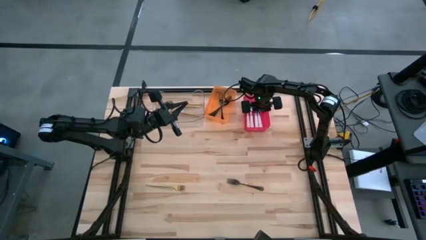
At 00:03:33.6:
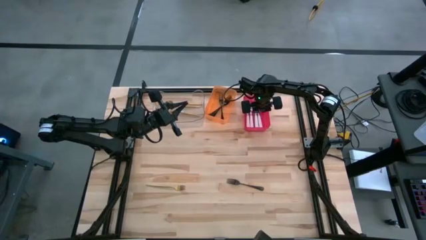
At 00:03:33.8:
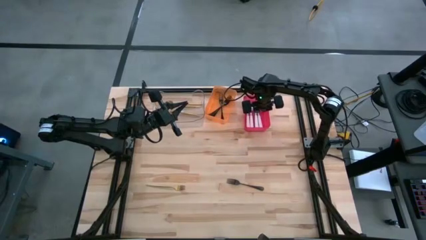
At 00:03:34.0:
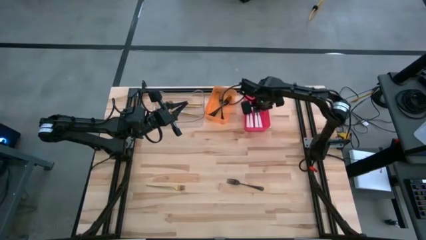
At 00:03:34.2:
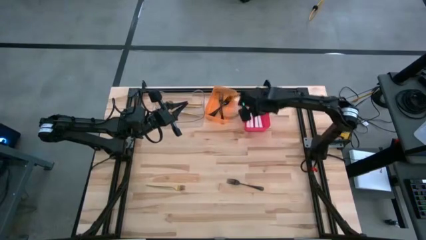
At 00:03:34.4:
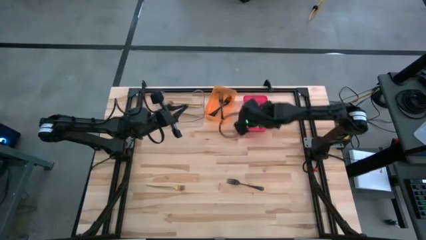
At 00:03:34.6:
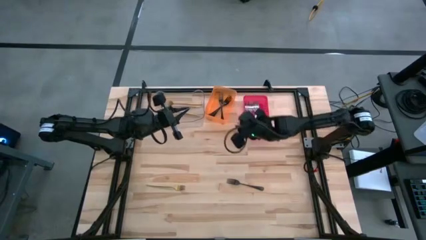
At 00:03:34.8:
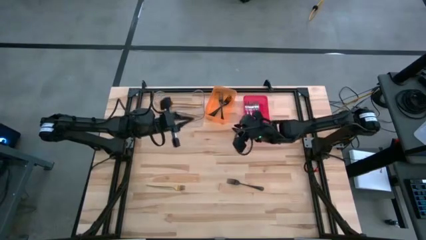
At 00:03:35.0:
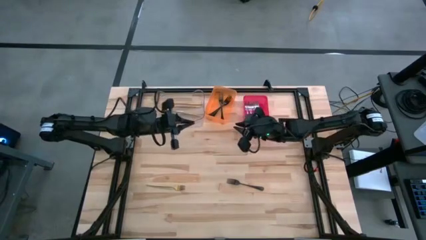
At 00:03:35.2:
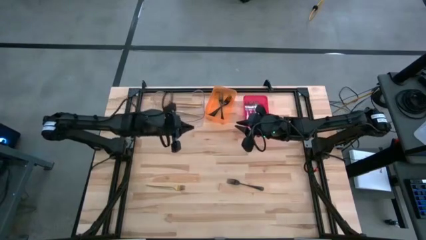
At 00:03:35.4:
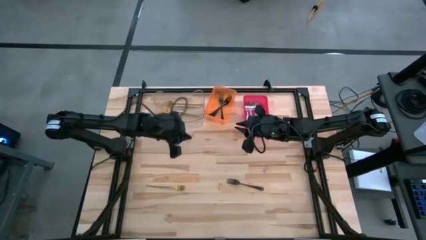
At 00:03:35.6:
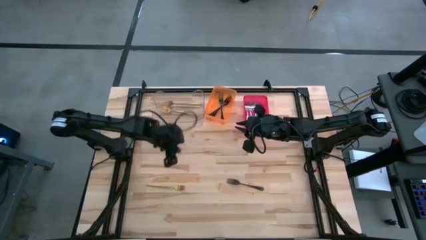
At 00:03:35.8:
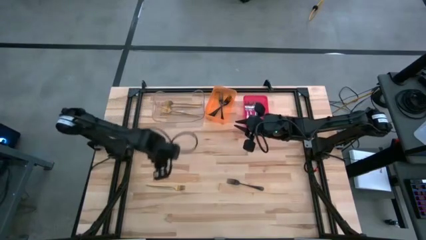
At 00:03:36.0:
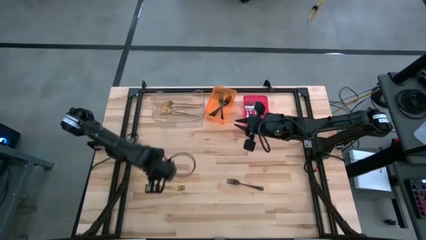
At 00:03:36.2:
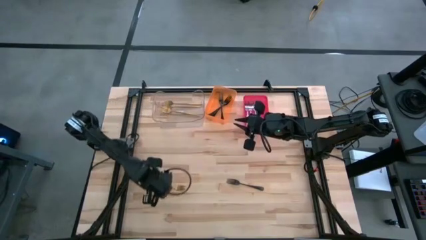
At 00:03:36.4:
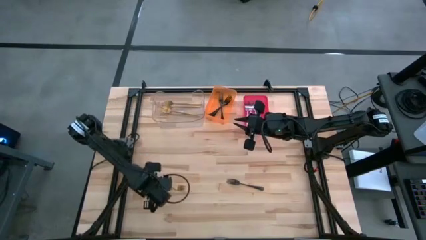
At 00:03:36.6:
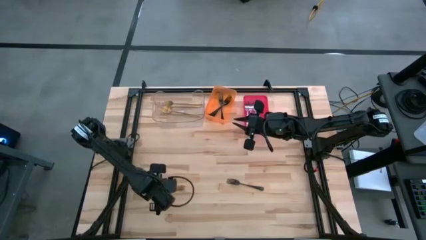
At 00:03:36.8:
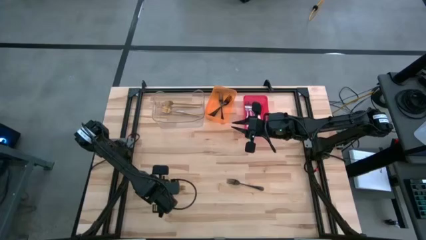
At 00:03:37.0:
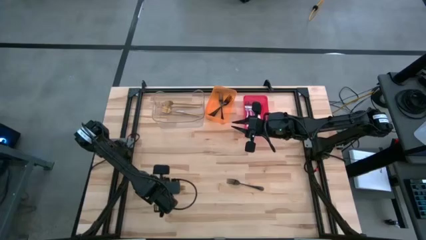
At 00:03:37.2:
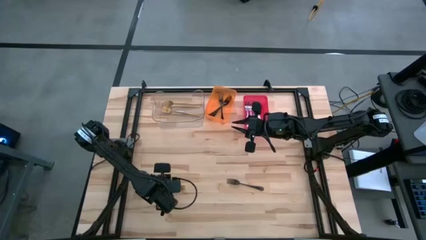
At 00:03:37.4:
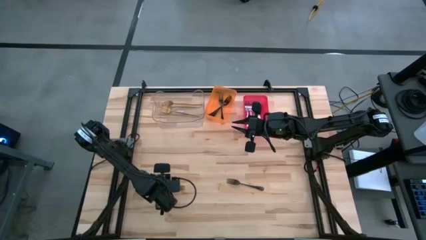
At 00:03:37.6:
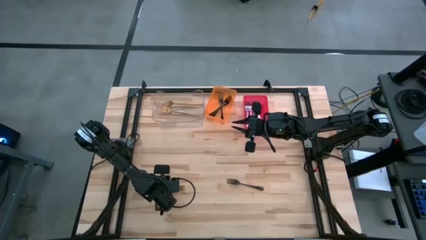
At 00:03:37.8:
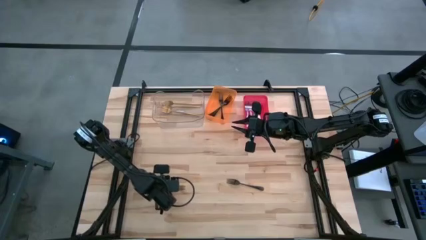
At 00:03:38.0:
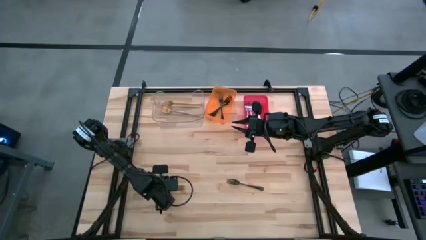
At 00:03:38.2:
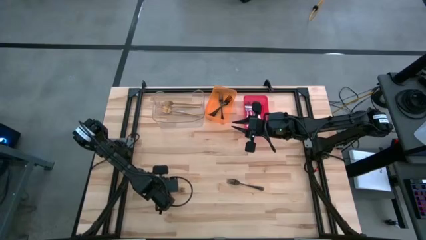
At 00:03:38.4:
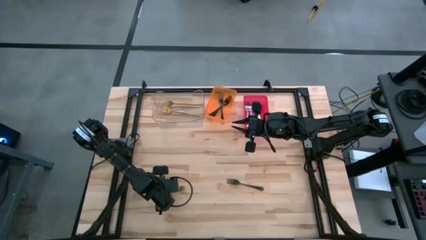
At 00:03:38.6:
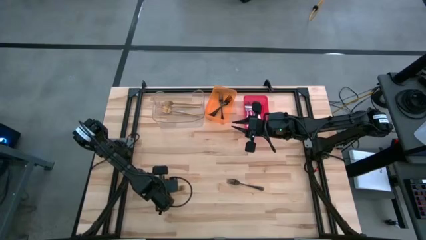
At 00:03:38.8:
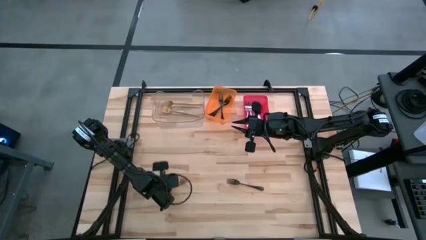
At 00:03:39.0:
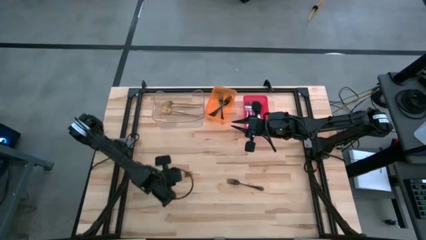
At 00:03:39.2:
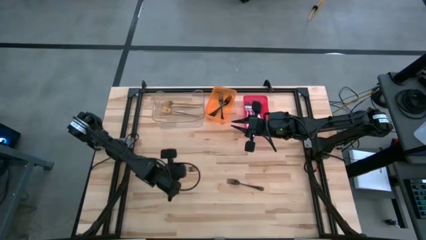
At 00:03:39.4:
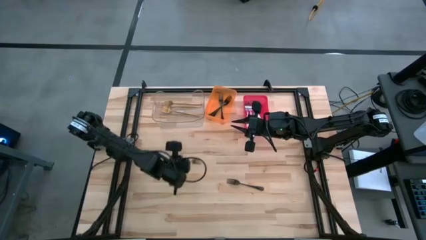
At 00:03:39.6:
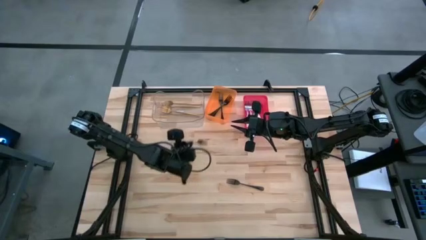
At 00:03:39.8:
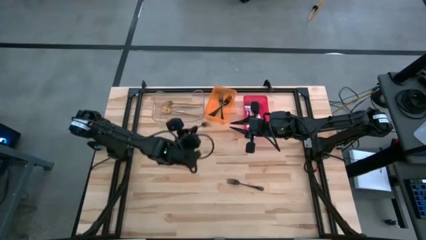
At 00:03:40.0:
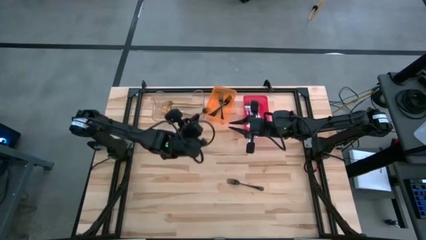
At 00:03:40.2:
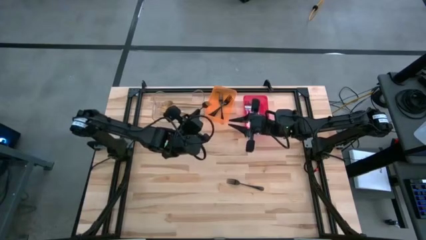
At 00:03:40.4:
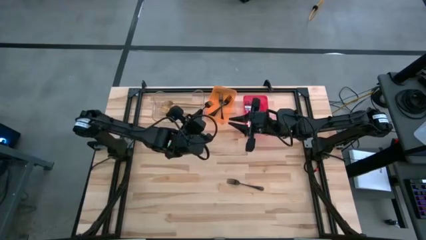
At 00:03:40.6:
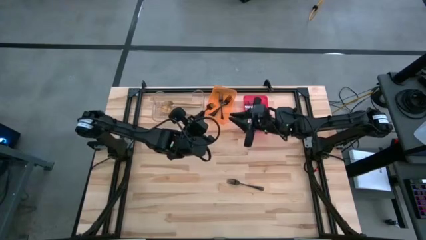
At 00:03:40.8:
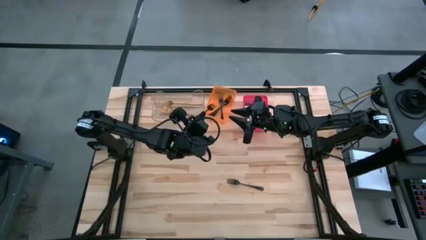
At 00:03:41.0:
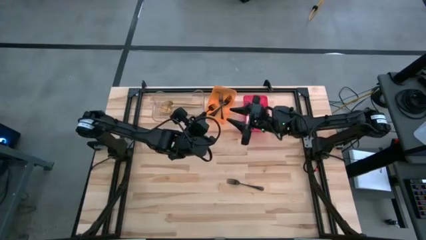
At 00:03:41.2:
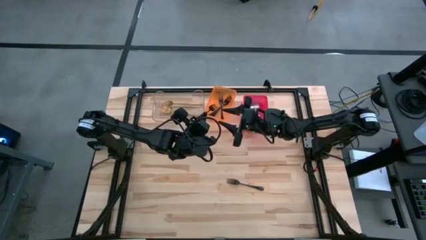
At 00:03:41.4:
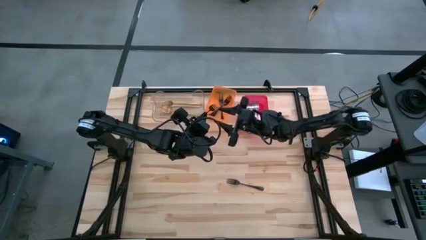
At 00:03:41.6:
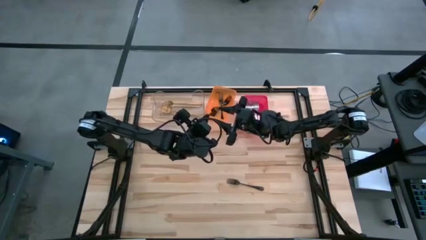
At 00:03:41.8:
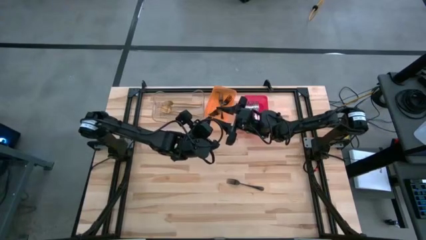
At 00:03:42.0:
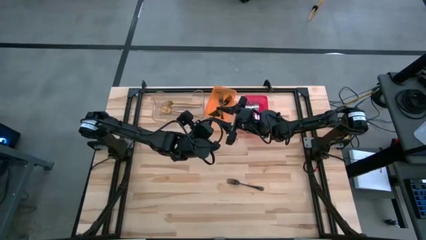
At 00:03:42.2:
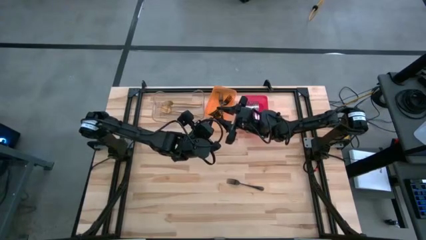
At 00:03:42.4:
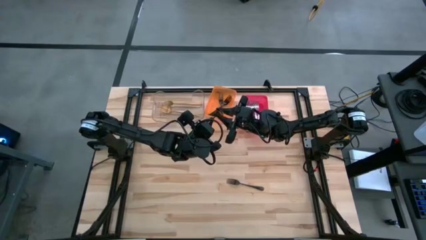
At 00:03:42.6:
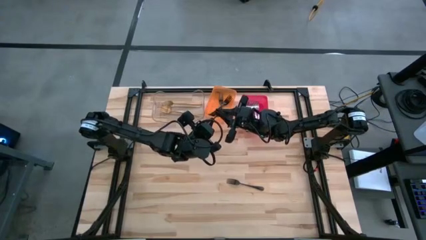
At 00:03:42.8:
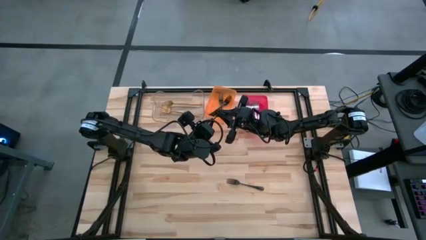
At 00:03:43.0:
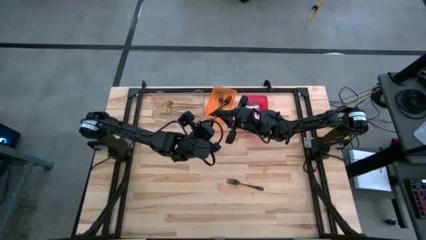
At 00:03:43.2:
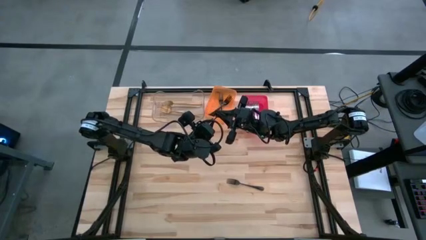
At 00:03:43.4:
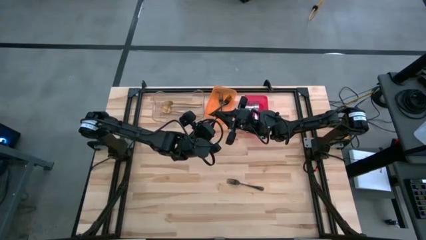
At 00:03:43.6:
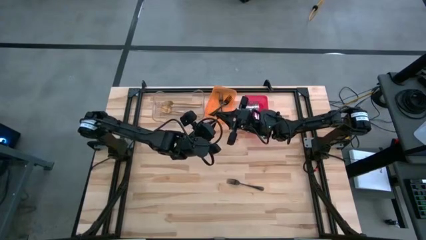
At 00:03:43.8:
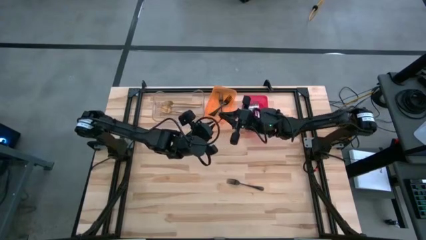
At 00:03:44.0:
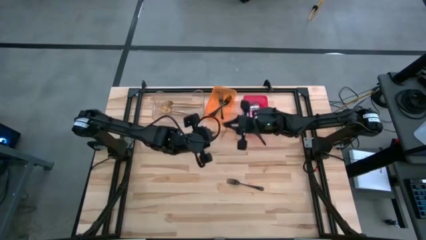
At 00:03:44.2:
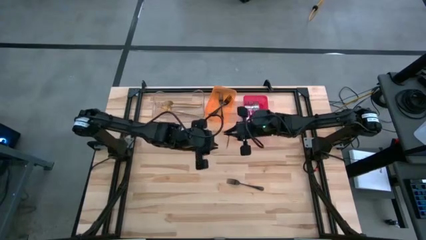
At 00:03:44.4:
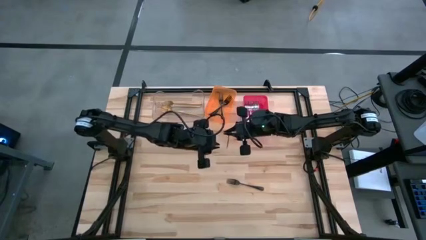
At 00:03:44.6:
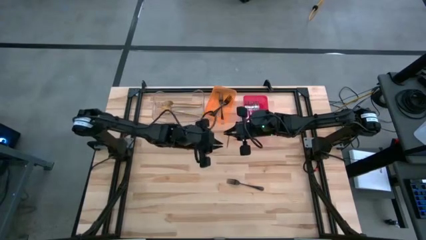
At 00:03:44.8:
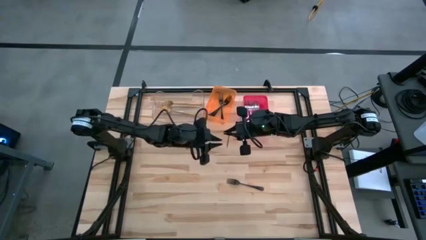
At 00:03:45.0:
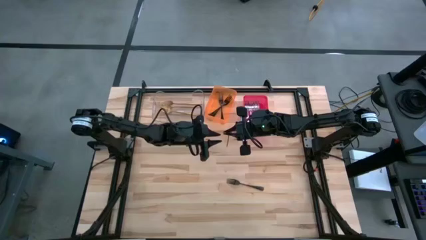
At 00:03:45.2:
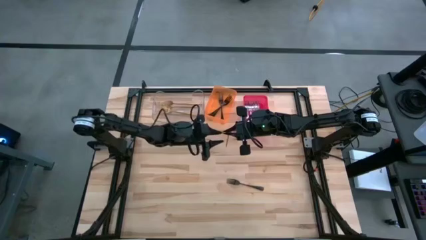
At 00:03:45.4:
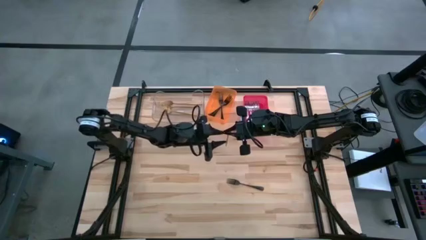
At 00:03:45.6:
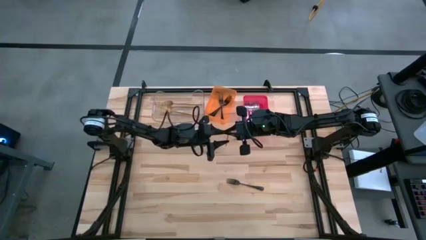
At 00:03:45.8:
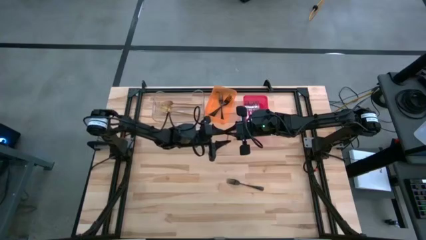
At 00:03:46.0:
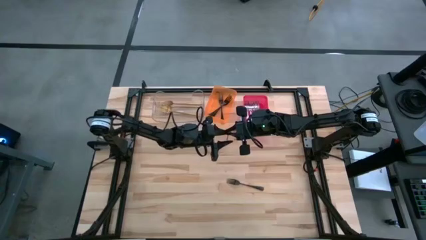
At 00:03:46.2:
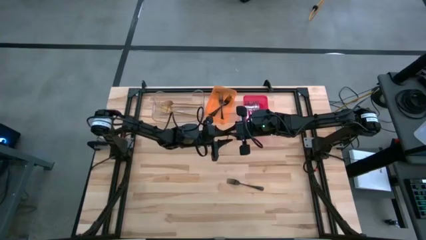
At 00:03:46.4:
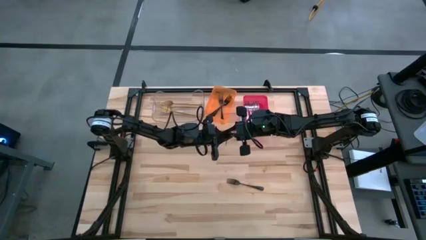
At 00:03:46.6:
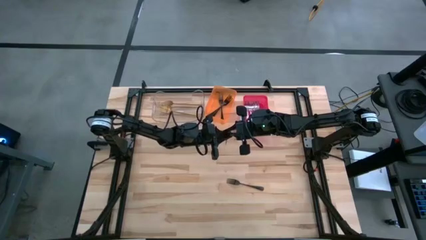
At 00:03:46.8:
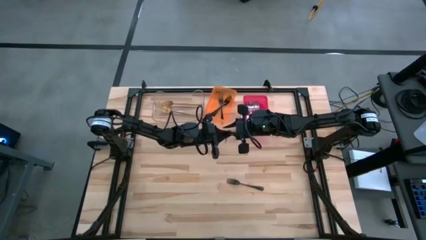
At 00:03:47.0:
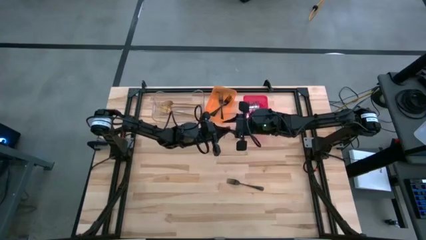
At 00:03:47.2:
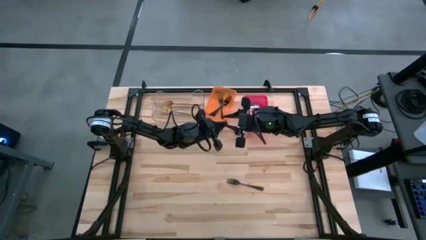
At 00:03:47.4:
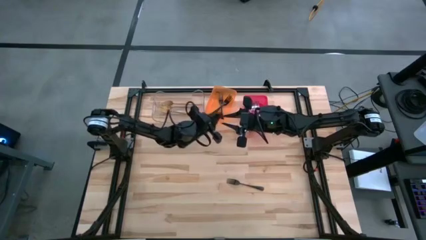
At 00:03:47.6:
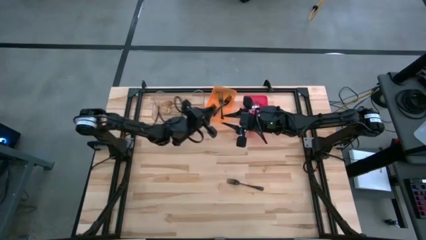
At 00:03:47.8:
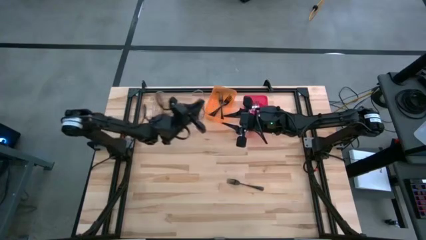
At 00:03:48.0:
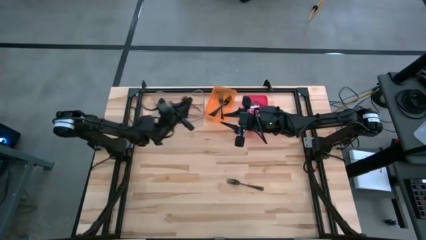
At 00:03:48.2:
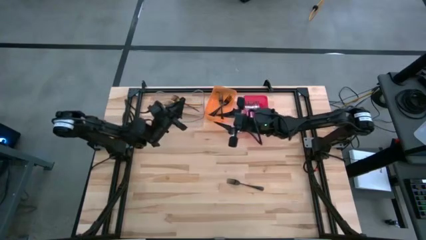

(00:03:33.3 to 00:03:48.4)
Task: Sort silverware by color (type)
Put the gold fork into the transparent bin
